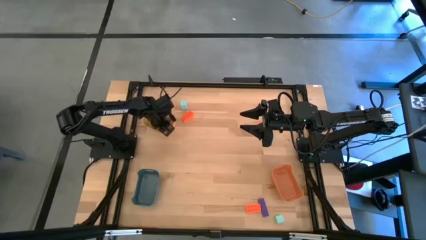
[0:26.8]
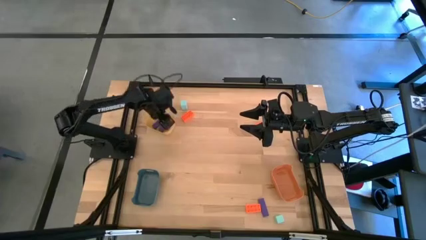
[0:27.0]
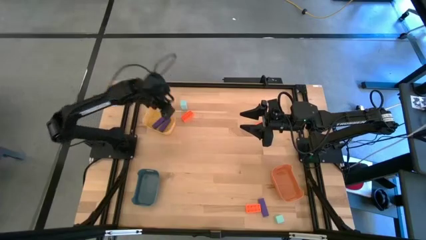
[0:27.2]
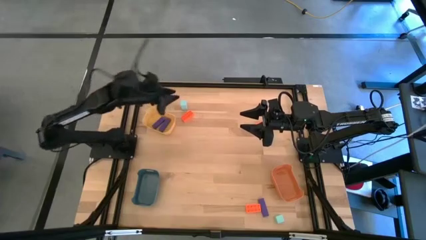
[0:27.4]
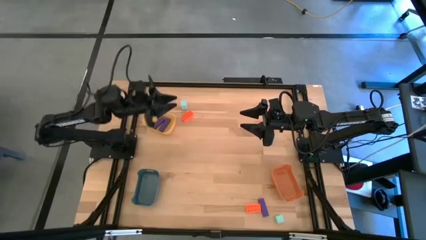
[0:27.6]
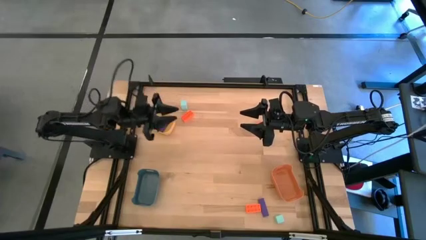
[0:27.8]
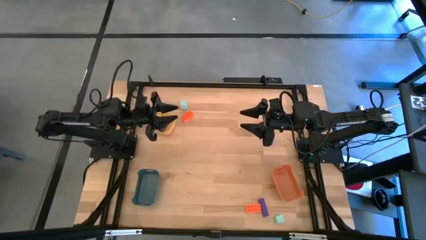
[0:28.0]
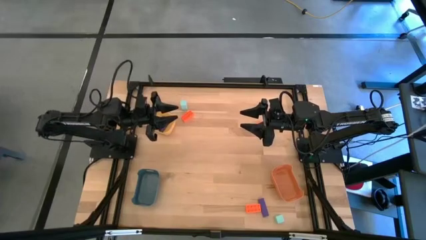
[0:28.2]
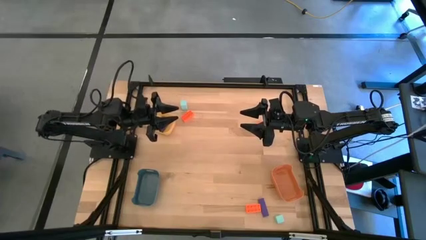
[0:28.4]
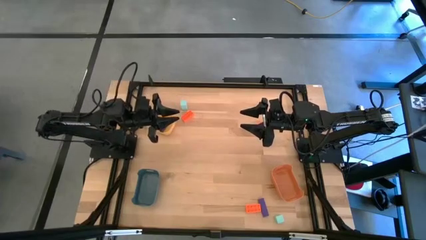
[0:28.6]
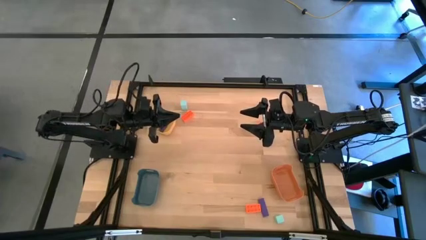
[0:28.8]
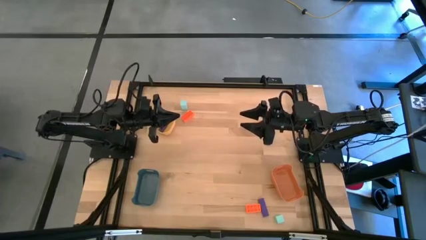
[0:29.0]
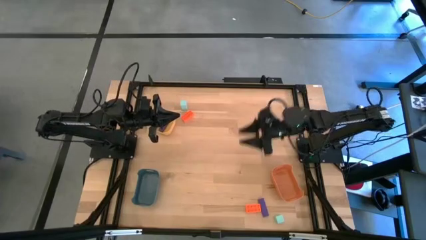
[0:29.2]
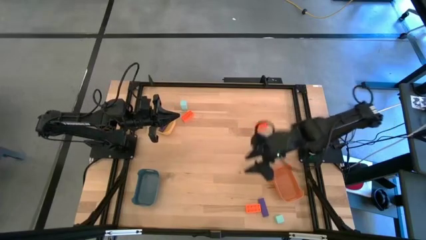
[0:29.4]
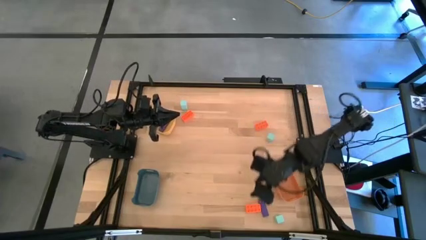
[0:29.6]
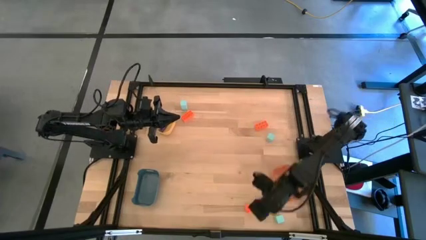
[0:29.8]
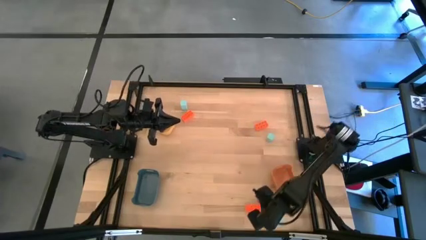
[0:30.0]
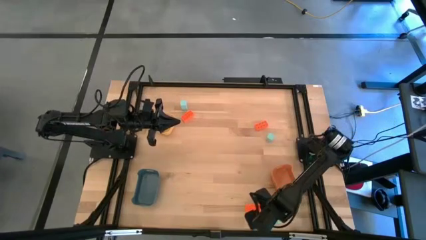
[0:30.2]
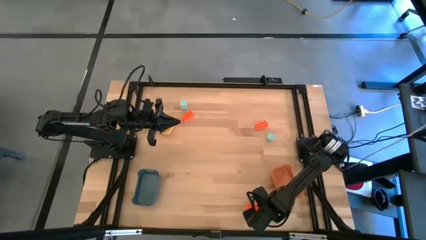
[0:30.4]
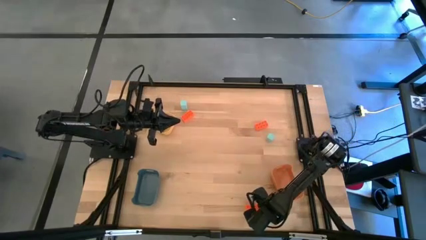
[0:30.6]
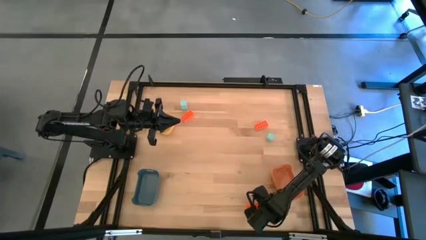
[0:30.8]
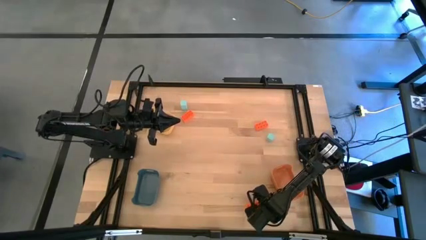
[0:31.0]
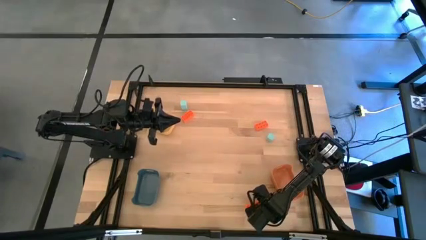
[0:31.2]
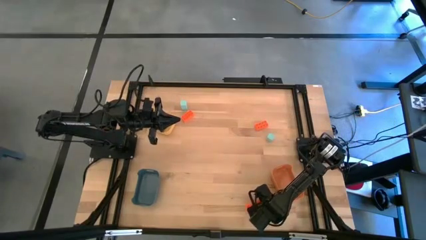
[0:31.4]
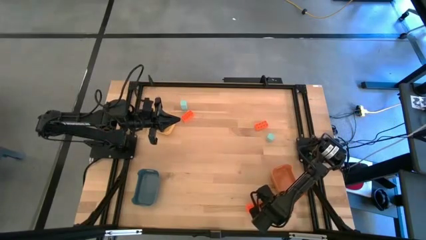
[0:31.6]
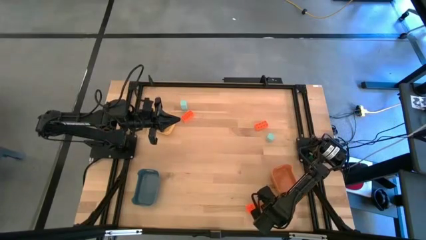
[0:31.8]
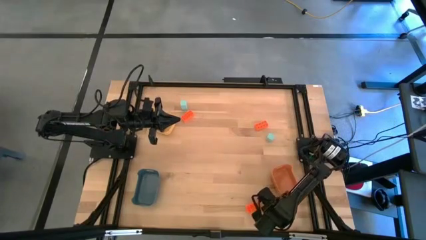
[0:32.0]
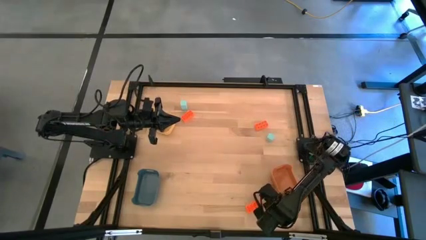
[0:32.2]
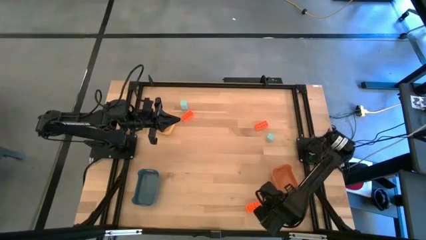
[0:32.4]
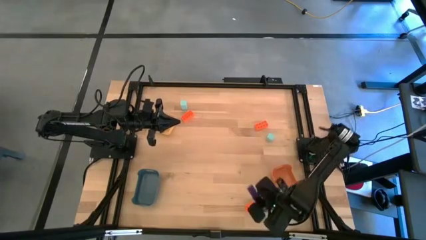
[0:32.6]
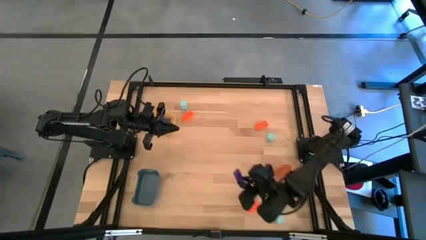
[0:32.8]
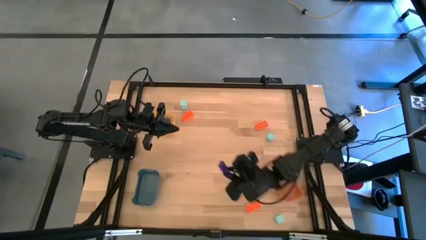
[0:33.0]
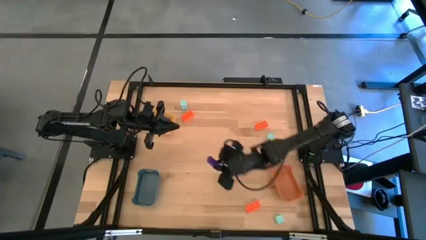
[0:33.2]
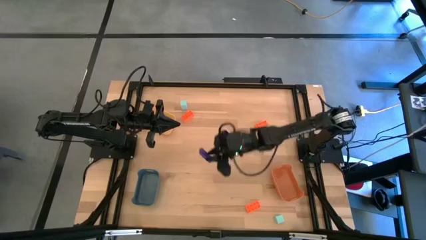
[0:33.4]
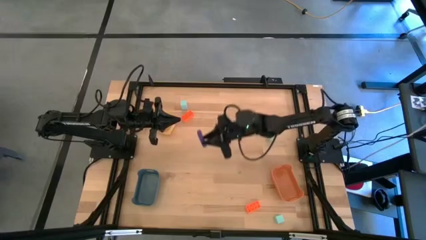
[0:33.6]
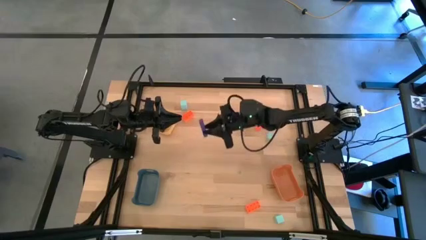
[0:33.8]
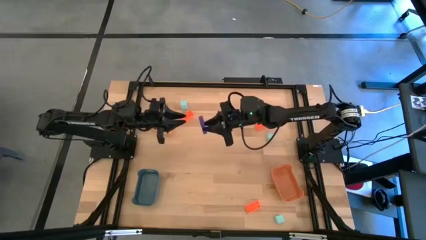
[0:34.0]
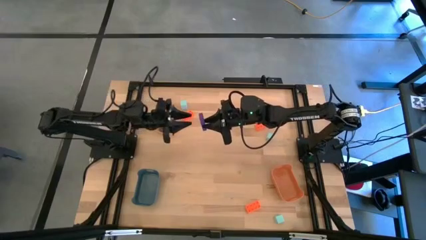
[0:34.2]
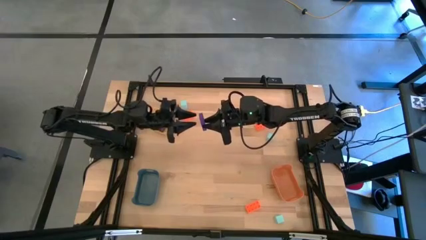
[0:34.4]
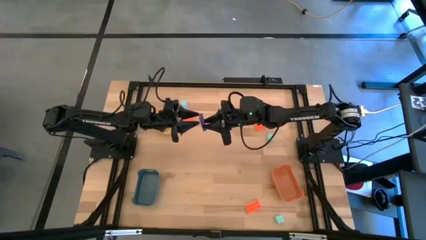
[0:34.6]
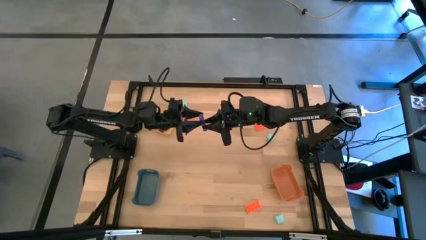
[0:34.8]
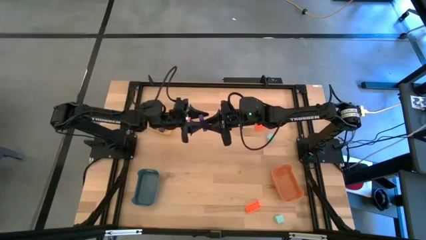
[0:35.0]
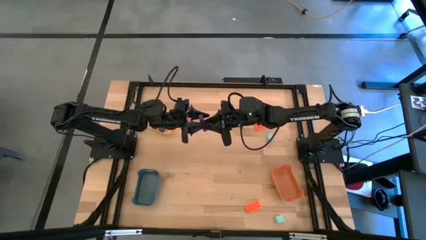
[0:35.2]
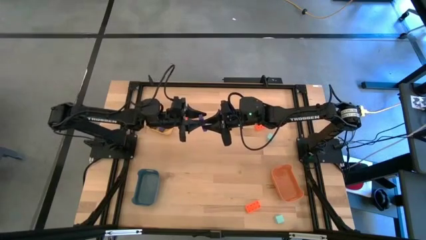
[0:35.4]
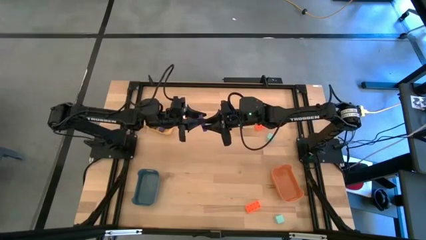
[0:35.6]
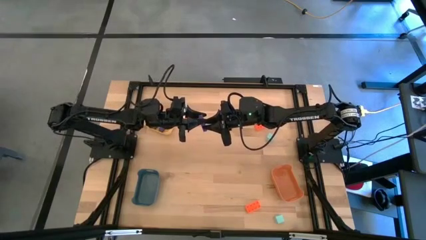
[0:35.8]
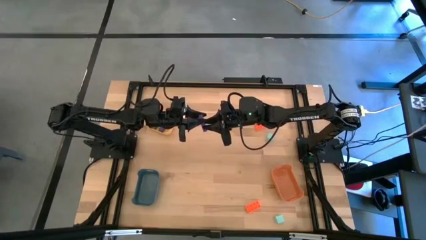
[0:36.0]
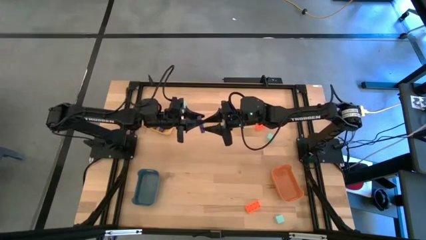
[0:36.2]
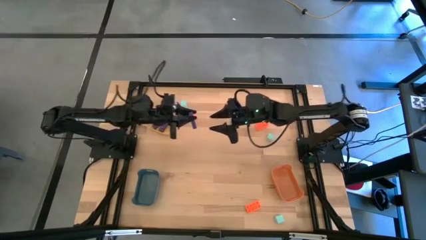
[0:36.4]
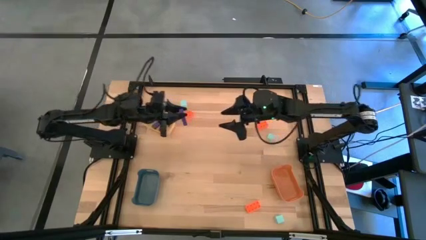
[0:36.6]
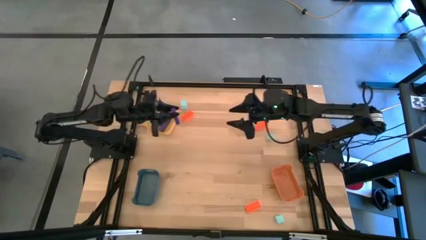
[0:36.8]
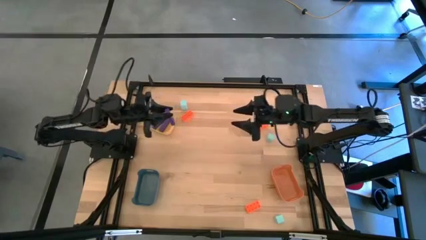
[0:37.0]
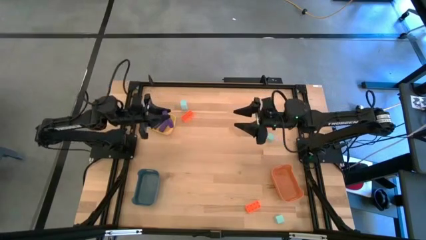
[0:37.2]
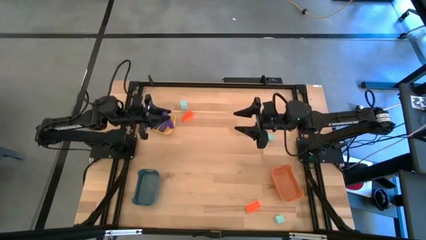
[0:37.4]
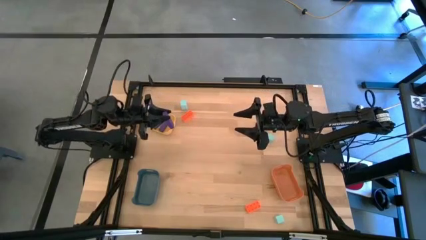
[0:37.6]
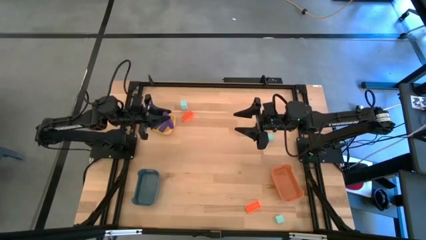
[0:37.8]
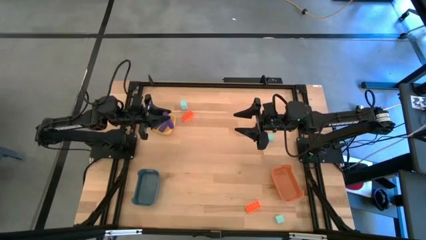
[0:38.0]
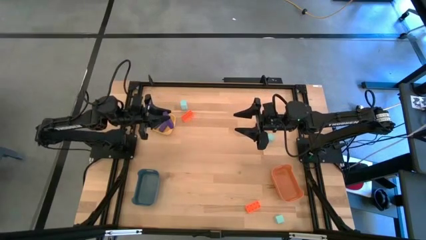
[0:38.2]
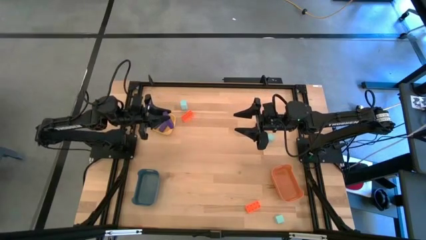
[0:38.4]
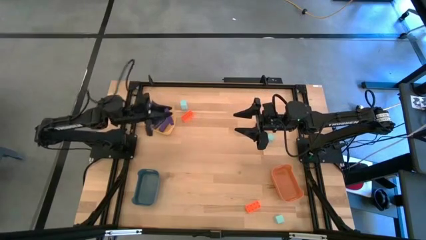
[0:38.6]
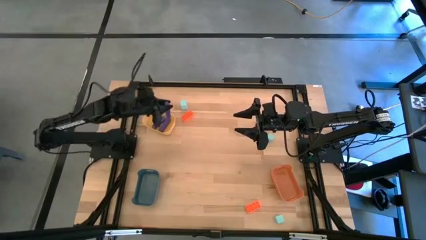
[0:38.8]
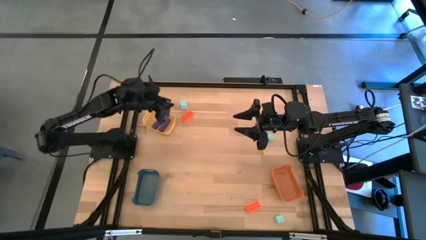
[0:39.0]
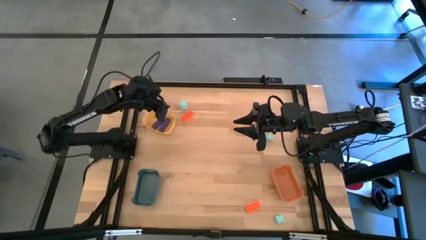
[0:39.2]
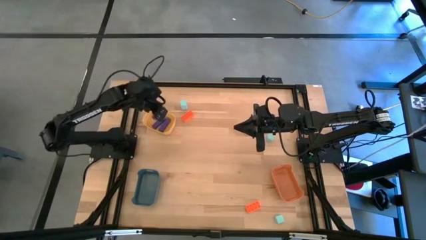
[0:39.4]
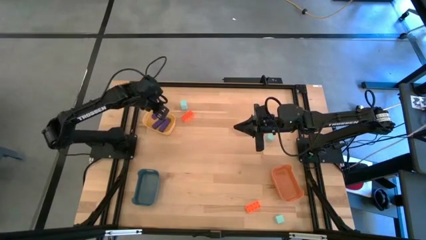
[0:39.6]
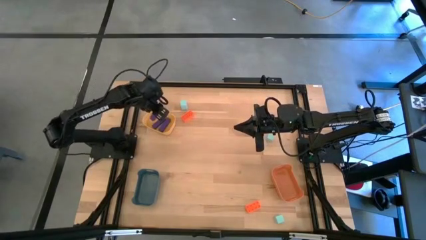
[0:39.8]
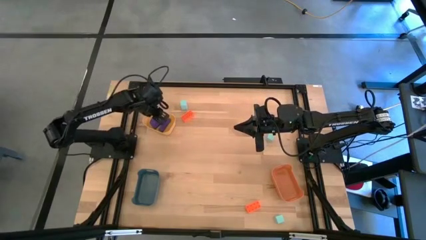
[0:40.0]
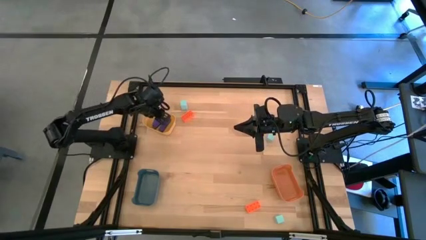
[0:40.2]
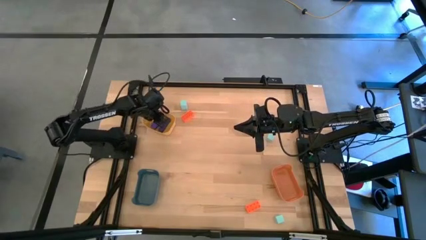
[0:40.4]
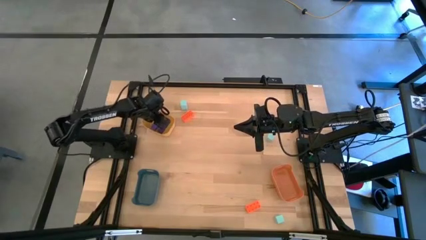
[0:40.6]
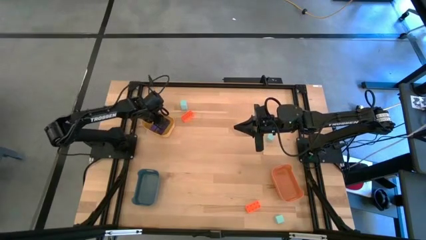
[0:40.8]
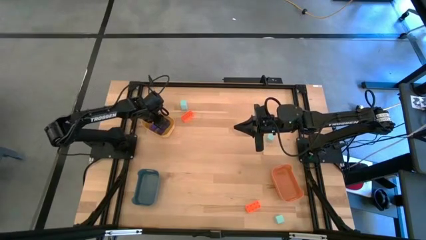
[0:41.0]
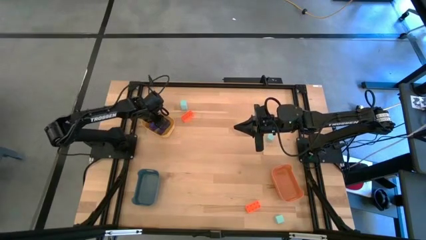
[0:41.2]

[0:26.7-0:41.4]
Task: Sort & place blocks by color
Put the violet wooden block into the yellow bin
